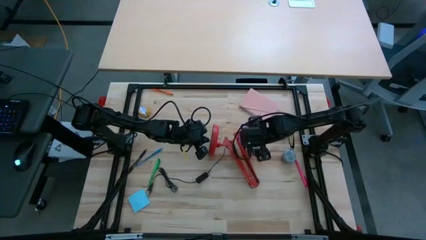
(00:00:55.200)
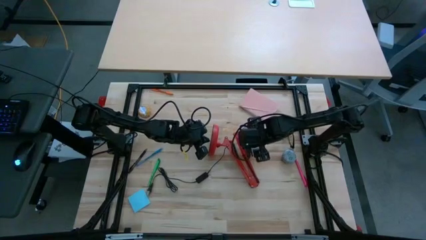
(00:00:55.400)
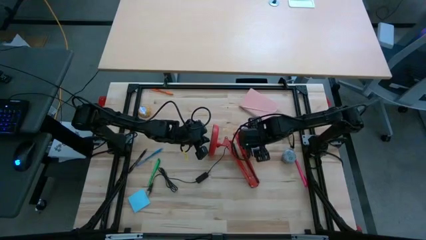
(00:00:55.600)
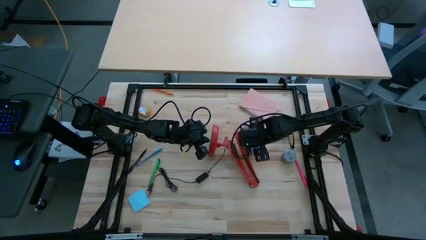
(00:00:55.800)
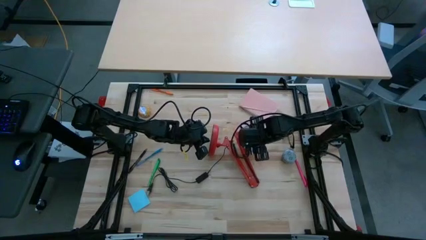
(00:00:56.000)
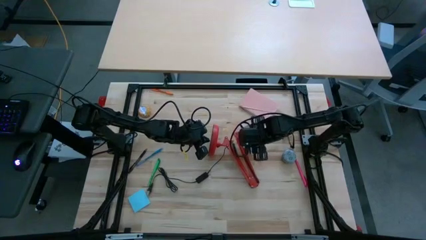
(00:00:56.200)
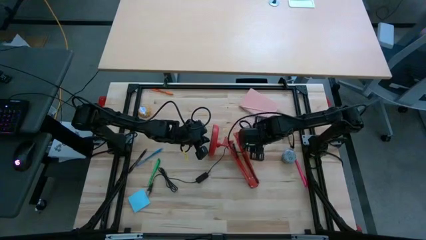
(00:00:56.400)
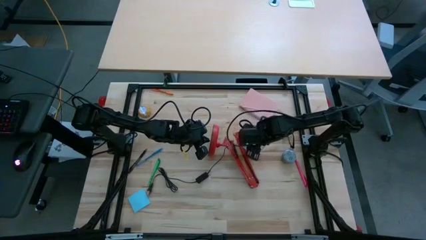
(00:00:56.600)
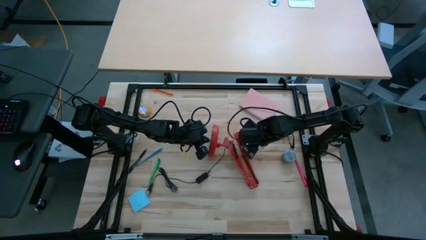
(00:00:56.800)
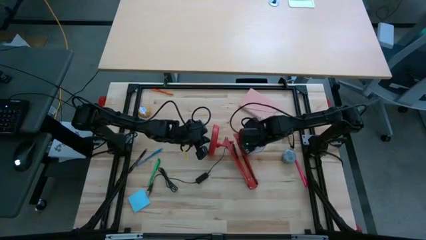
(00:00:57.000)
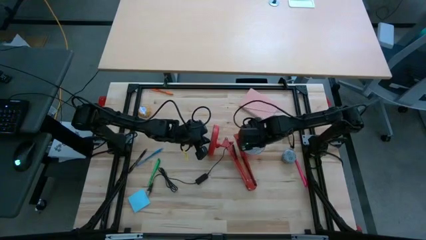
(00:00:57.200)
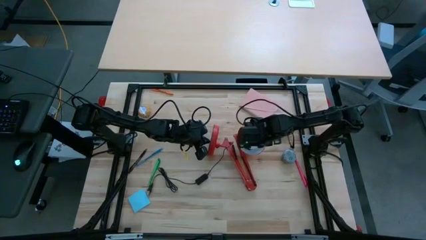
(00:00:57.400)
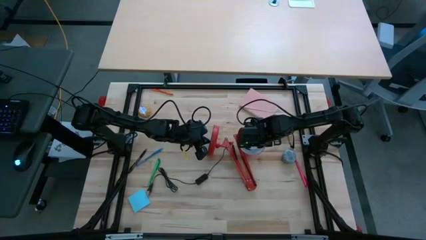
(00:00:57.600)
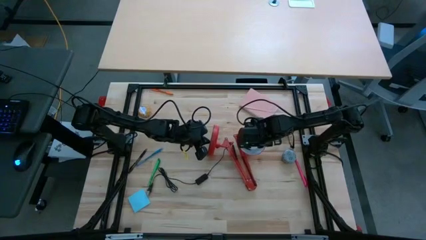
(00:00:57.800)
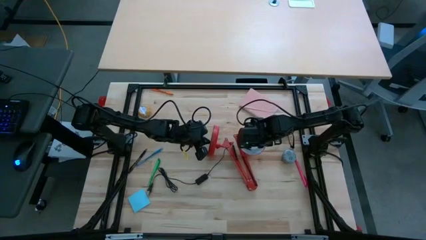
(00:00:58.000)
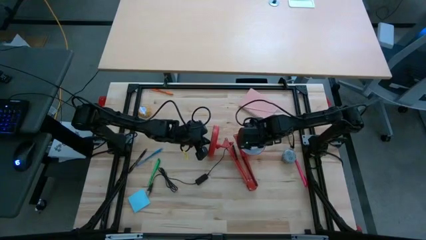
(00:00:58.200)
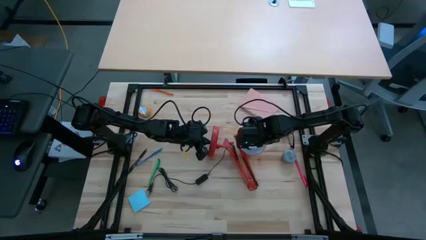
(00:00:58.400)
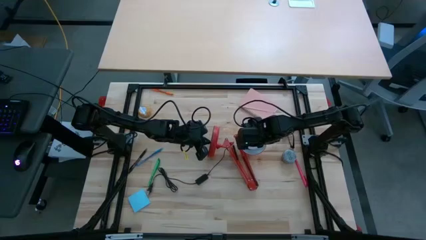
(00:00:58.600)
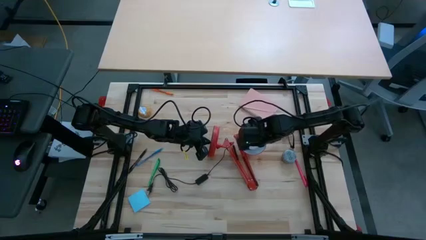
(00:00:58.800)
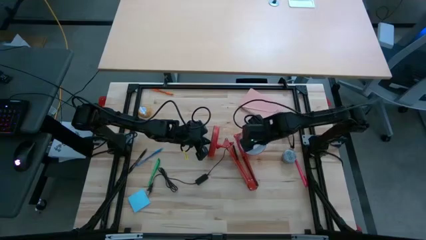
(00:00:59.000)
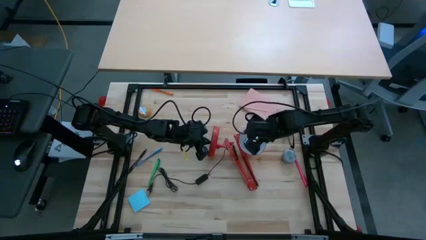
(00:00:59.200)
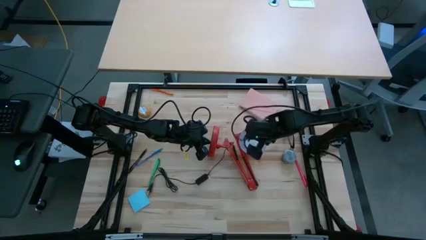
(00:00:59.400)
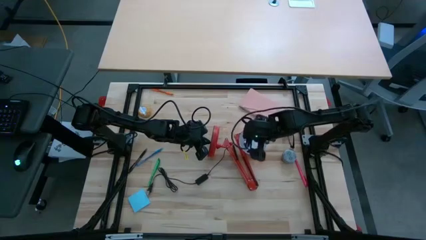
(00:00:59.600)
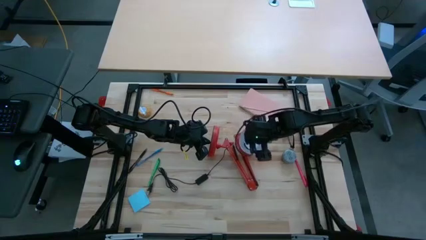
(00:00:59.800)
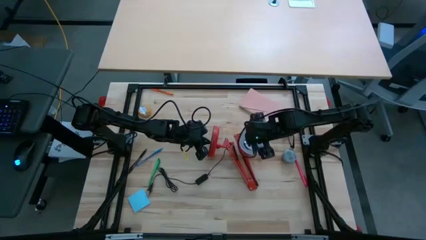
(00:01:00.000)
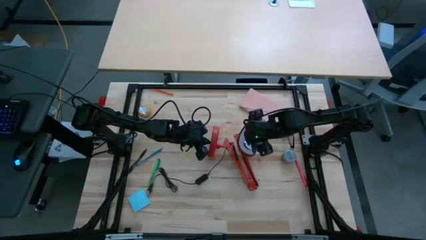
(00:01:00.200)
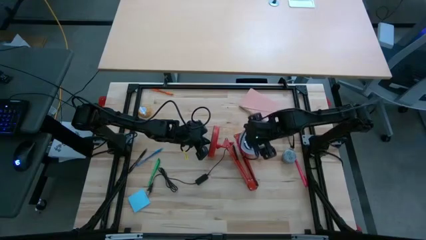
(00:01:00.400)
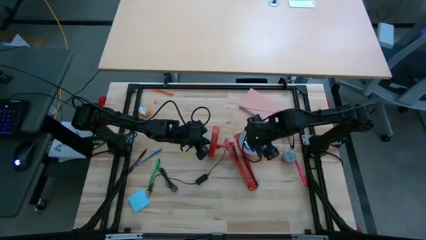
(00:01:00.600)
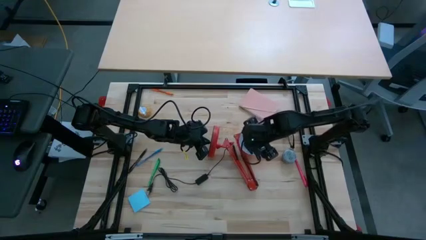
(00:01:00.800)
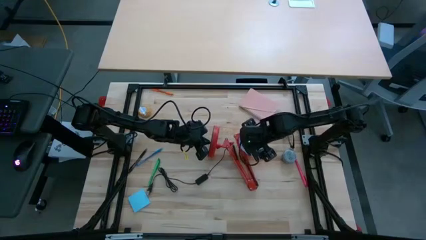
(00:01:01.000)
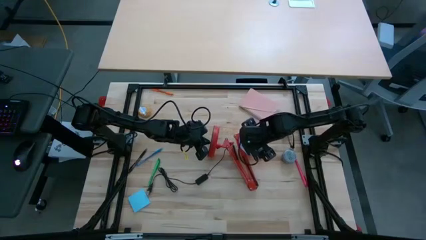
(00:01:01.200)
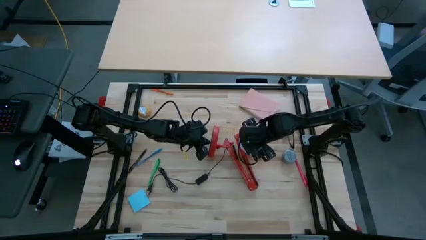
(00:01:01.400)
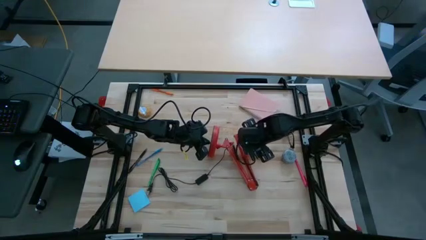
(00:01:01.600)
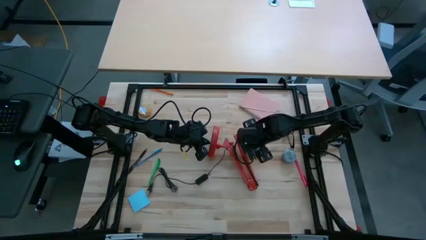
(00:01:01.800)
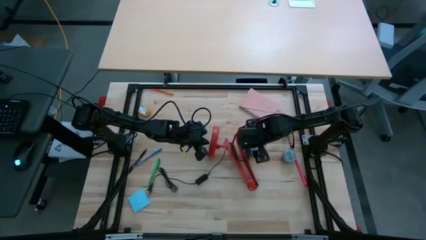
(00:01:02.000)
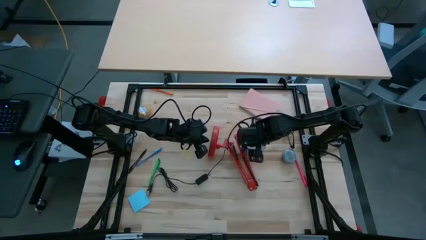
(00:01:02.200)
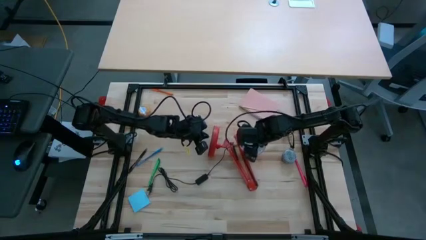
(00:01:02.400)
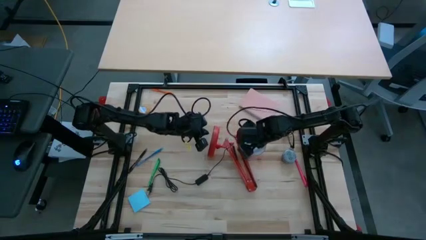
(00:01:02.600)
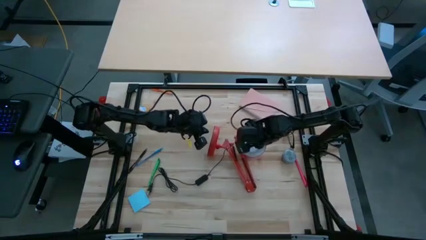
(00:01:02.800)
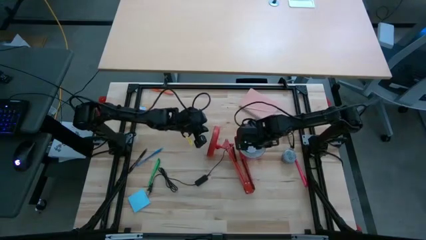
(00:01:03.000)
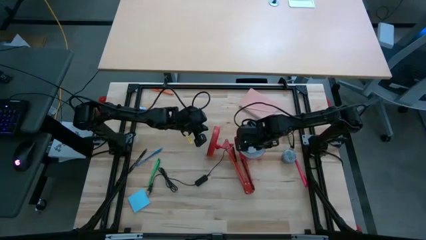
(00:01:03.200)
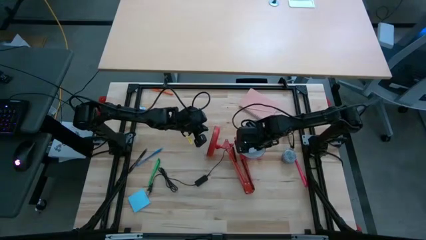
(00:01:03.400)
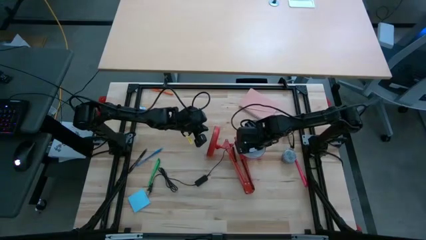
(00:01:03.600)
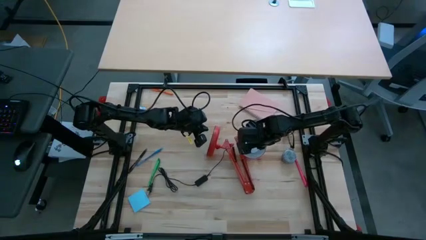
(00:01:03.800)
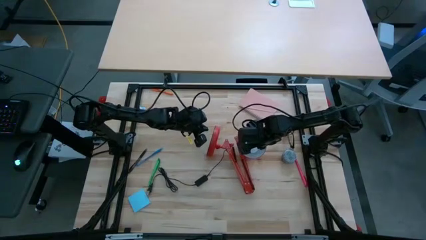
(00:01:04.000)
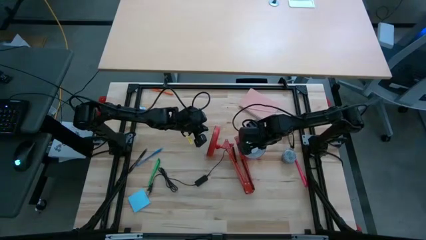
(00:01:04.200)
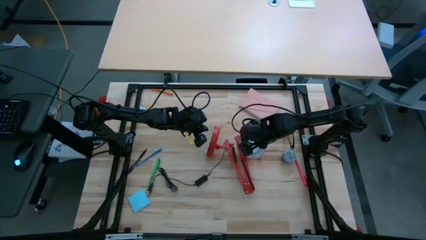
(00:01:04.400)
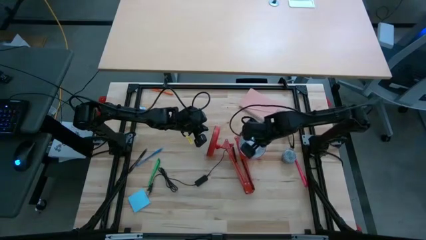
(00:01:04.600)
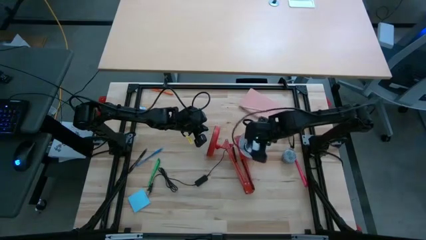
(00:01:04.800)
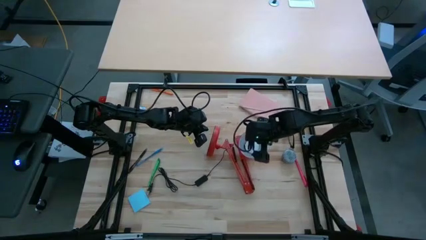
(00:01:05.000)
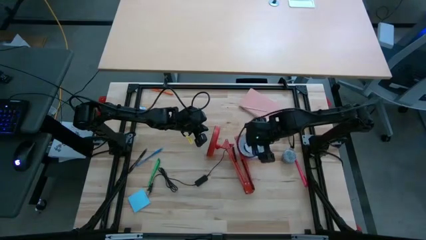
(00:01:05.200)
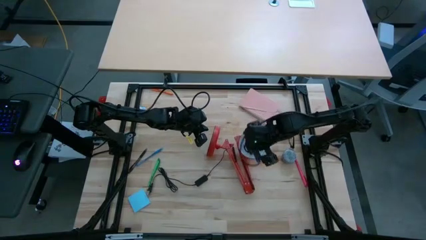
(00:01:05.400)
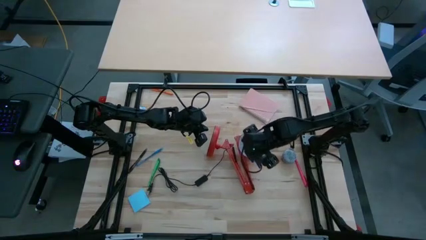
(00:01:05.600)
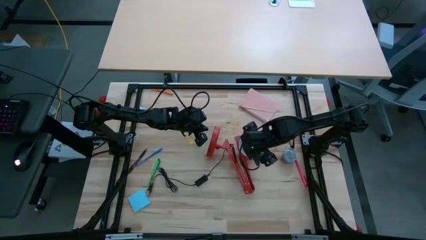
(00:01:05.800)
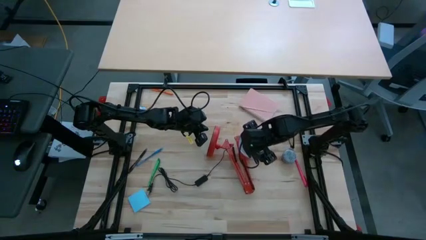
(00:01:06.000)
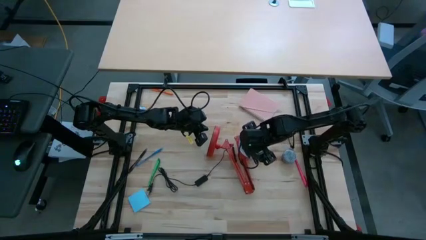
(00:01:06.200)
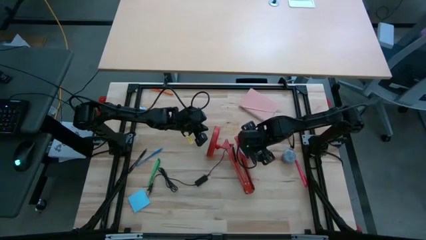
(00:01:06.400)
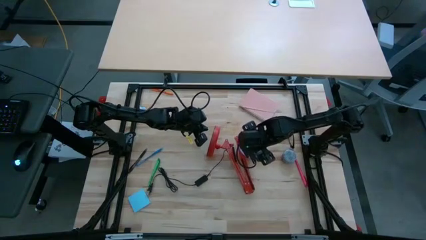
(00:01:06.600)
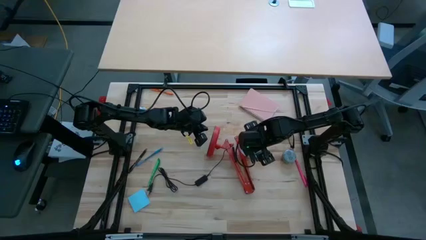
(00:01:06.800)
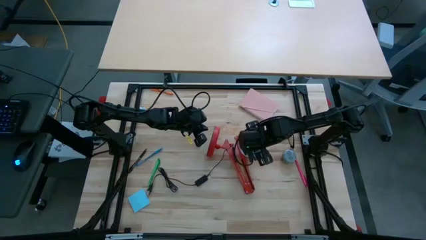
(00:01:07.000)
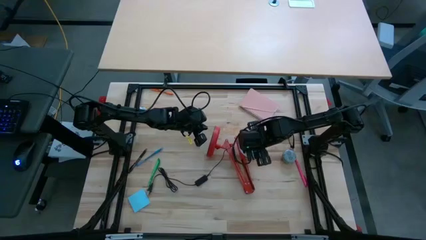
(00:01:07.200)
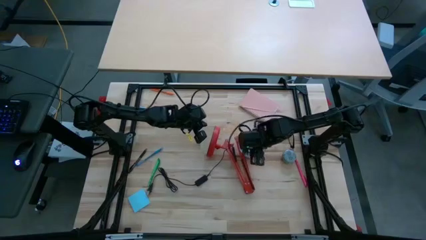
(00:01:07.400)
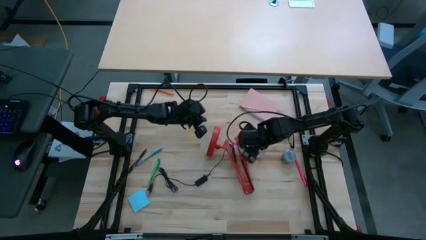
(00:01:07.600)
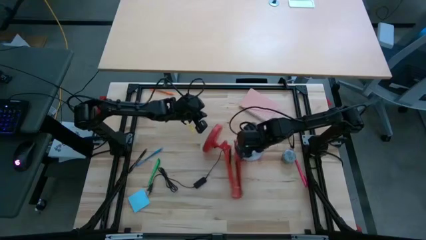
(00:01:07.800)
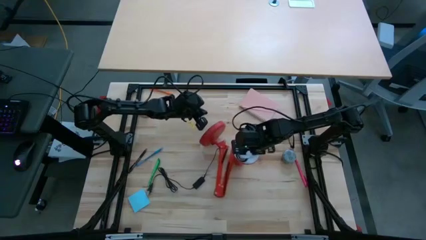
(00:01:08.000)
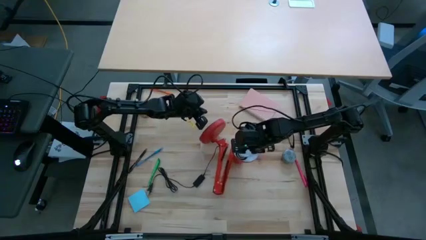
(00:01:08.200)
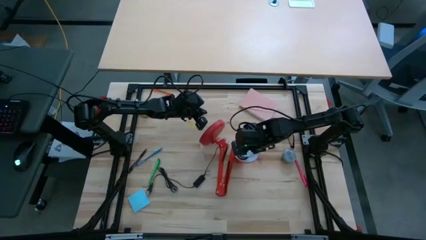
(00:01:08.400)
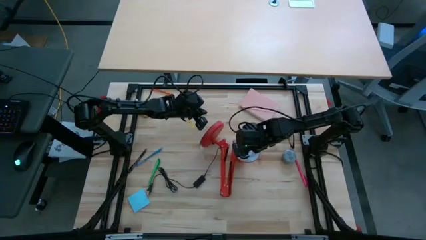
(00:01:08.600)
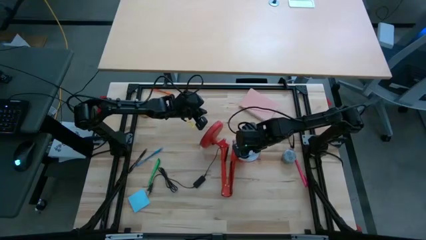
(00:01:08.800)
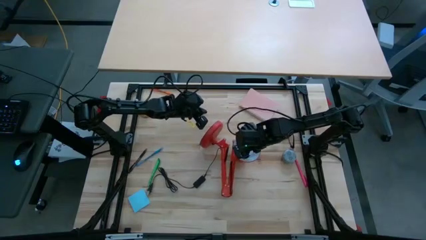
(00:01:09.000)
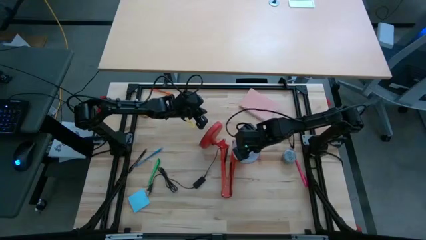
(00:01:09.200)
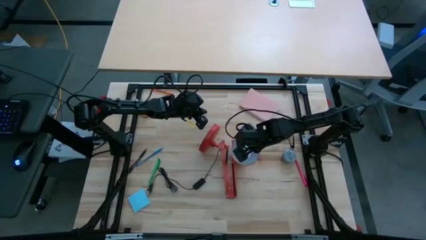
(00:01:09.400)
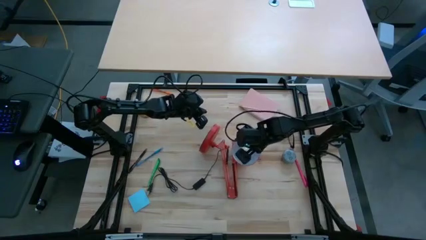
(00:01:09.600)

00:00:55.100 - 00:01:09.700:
Task: Screw lightbulb
Insert the white lightbulb into the red lamp
